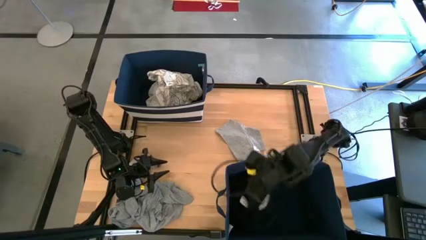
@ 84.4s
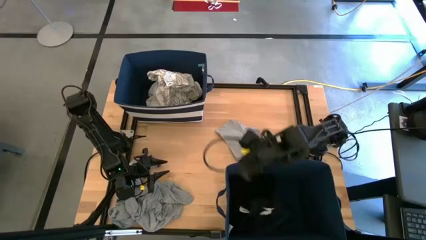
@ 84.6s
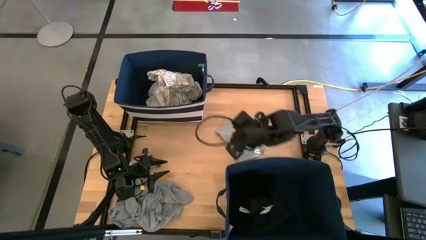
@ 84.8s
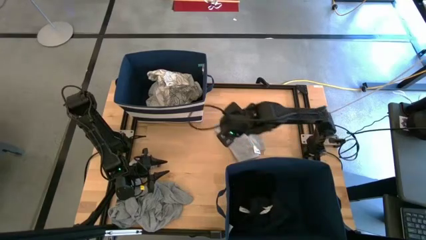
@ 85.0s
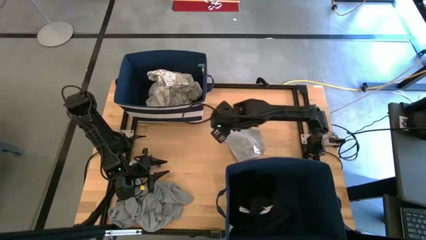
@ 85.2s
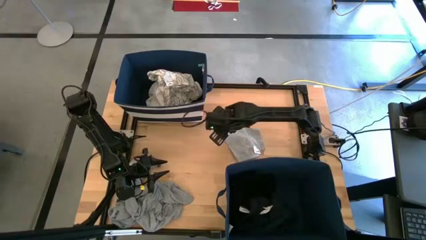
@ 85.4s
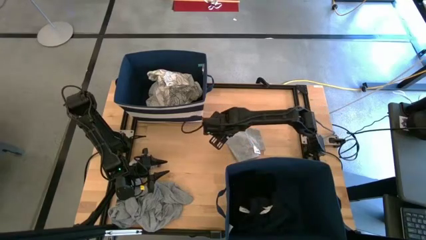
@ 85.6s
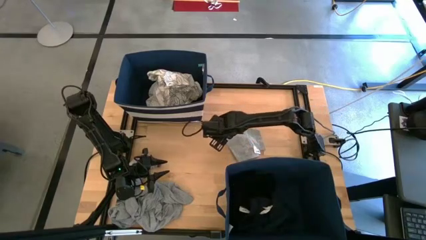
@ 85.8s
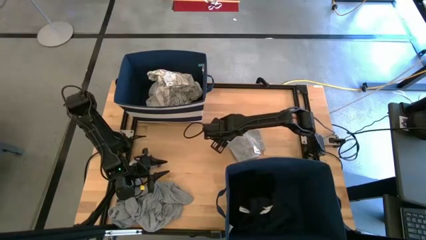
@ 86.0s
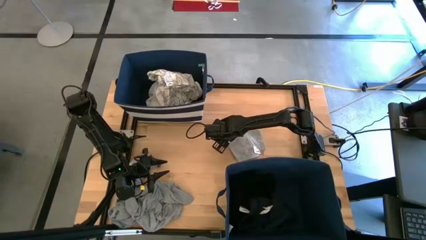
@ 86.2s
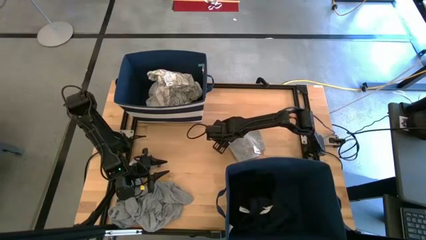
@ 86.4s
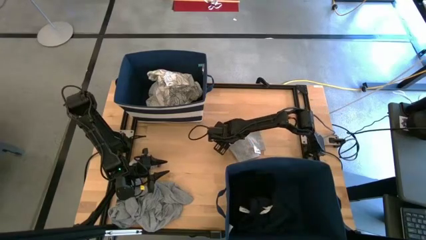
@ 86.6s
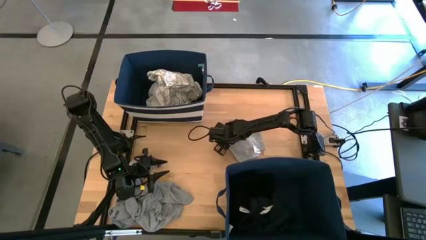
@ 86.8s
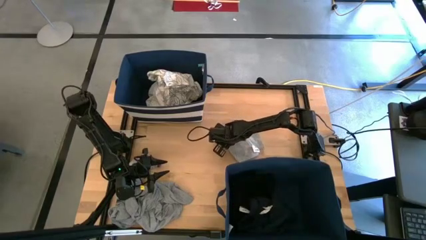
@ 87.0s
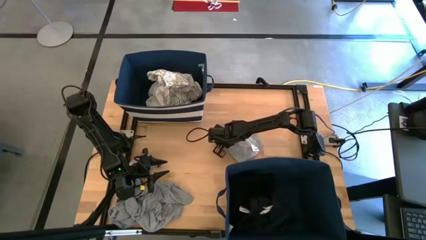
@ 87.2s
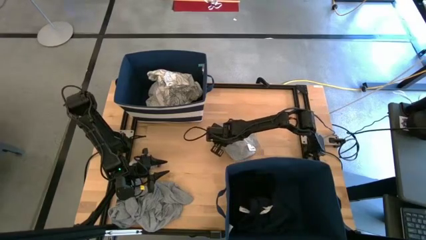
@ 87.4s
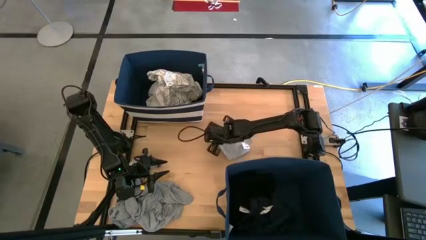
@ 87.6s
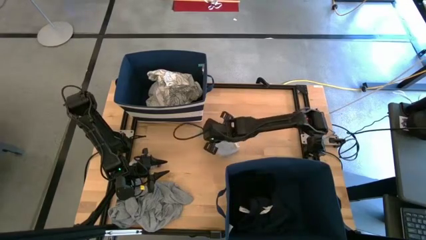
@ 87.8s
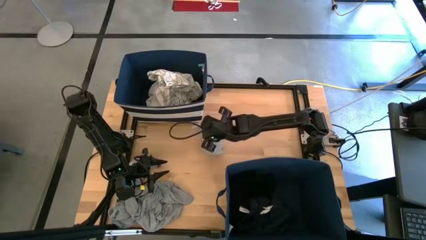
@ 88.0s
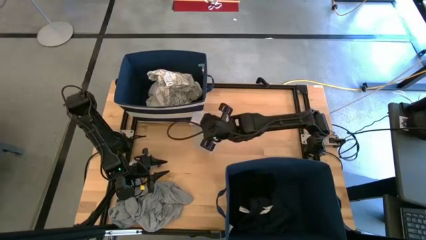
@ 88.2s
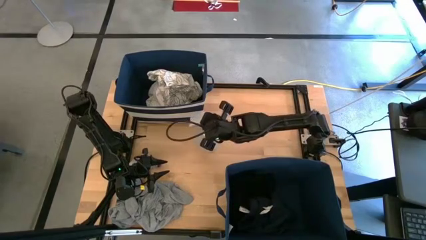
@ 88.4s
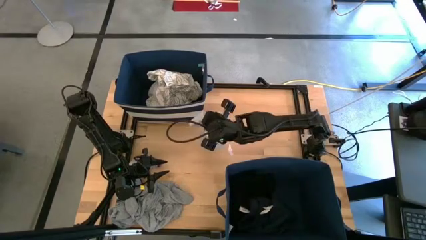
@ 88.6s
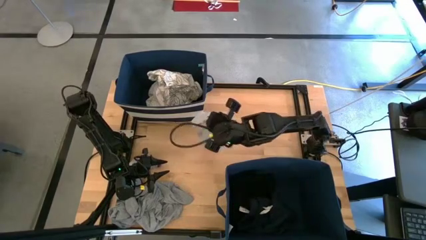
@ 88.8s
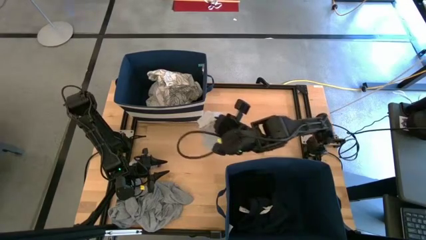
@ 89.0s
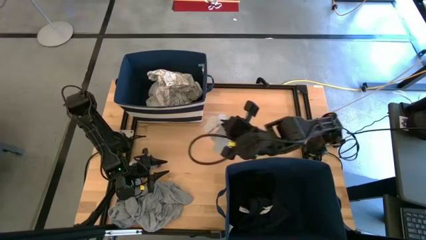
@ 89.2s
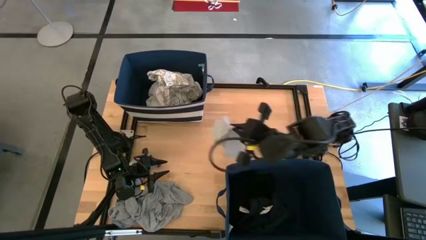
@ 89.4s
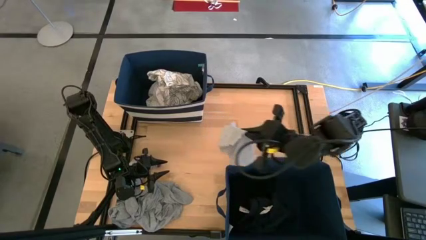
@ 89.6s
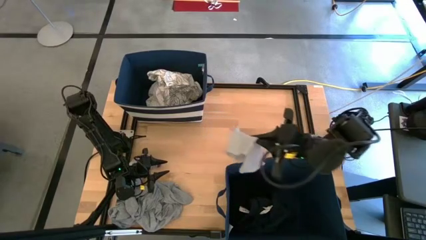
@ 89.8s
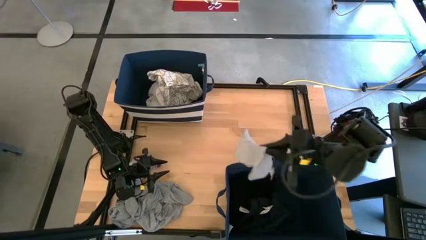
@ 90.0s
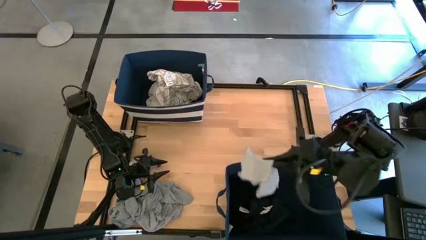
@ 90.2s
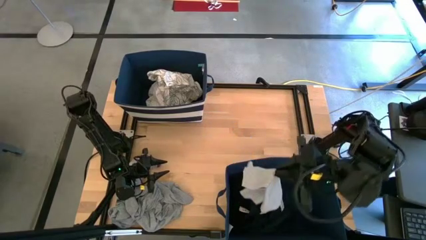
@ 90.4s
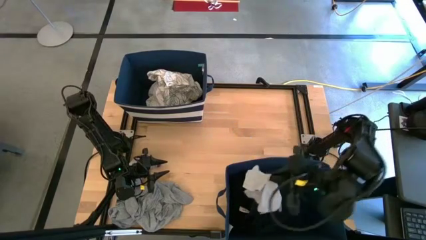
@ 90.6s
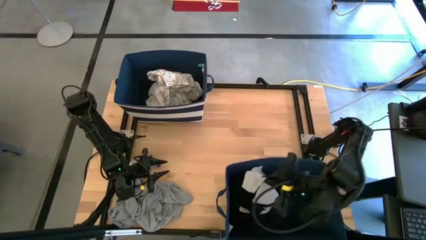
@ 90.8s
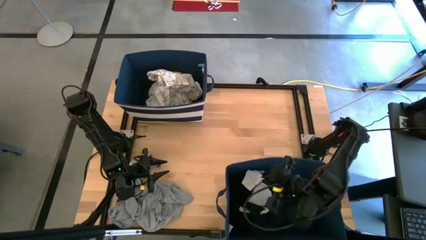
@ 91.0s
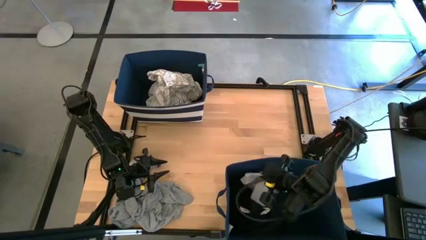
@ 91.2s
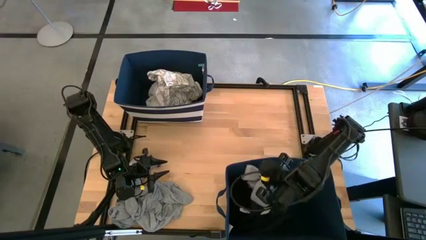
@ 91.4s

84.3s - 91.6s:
Task: Sort clothes
Put the gray boxer into the bottom blue laundry organizer

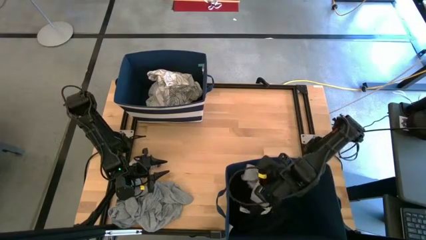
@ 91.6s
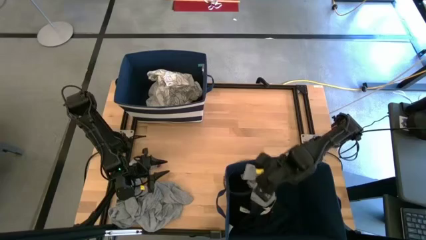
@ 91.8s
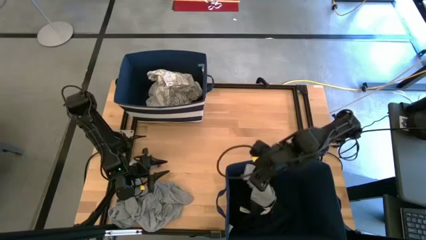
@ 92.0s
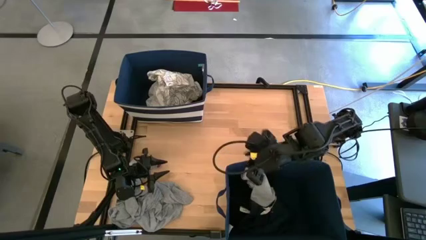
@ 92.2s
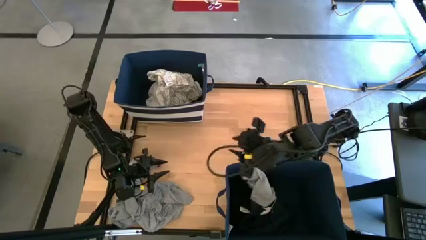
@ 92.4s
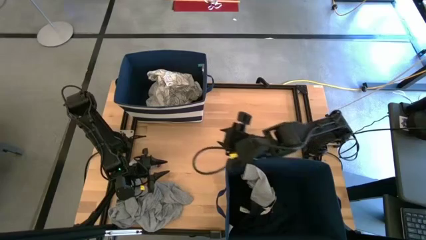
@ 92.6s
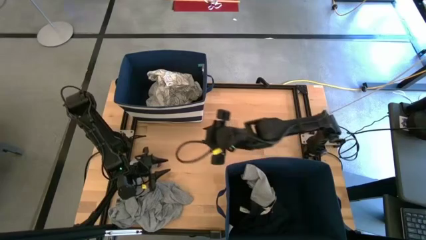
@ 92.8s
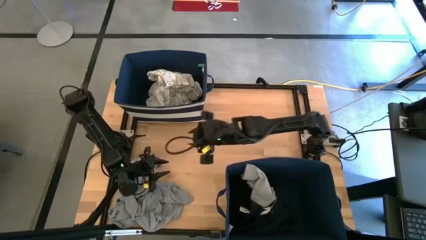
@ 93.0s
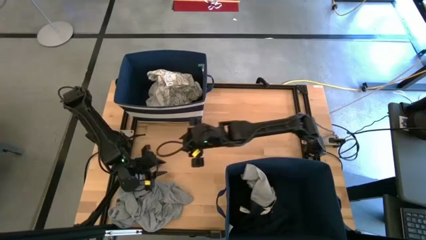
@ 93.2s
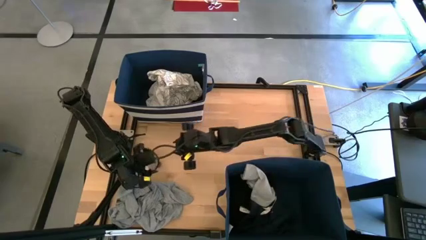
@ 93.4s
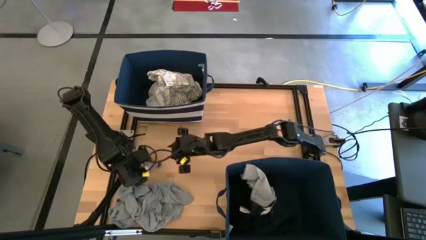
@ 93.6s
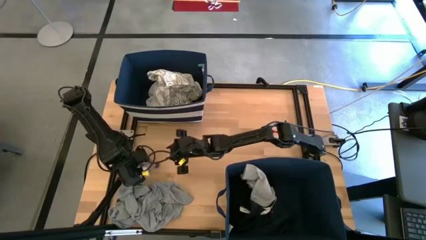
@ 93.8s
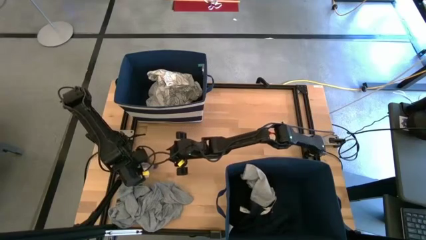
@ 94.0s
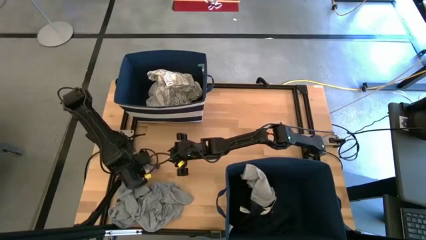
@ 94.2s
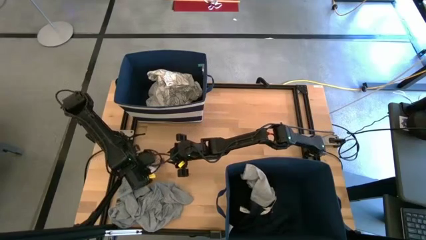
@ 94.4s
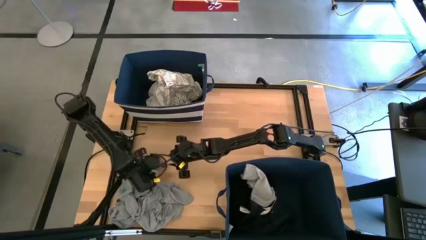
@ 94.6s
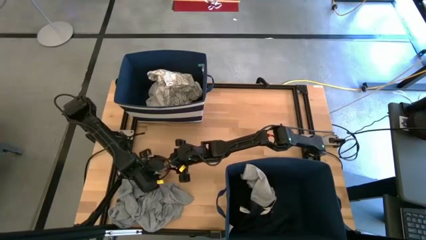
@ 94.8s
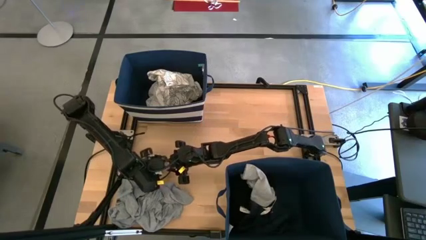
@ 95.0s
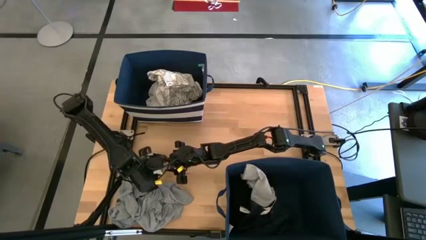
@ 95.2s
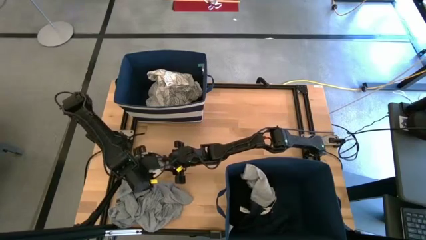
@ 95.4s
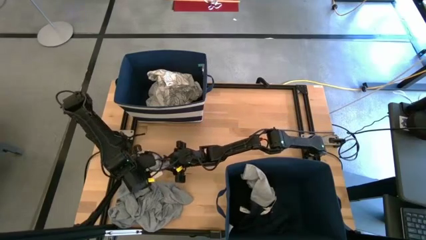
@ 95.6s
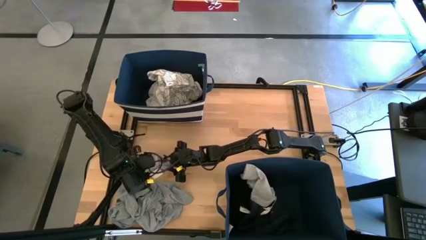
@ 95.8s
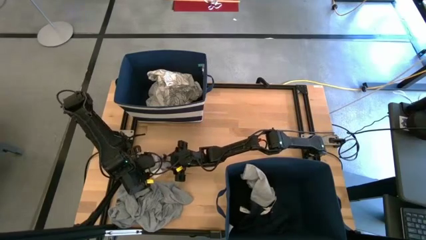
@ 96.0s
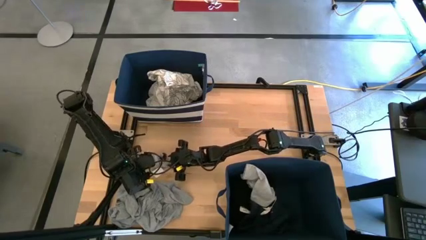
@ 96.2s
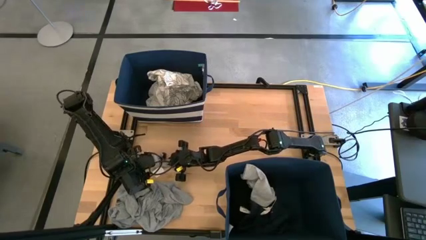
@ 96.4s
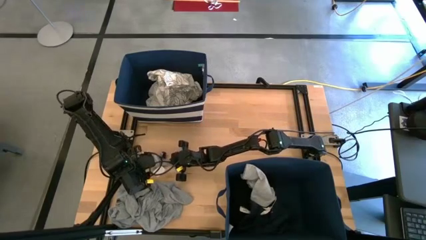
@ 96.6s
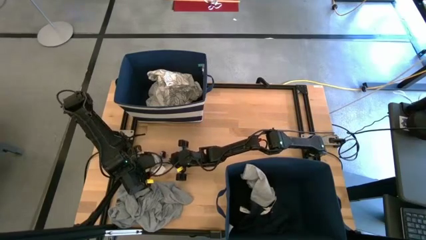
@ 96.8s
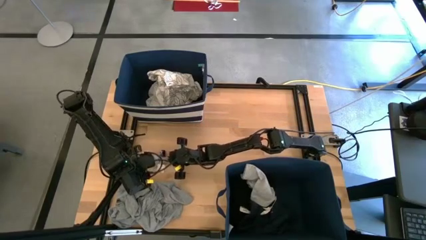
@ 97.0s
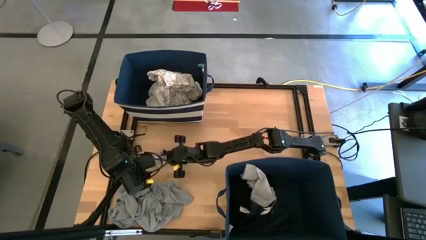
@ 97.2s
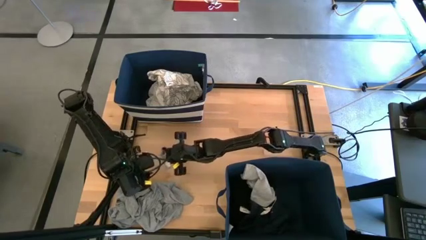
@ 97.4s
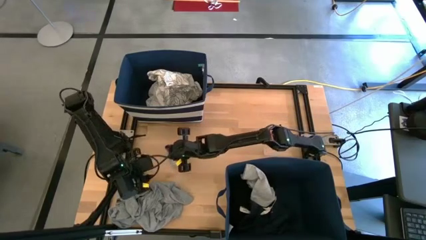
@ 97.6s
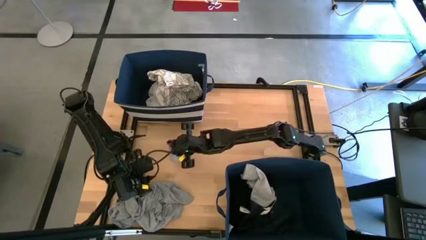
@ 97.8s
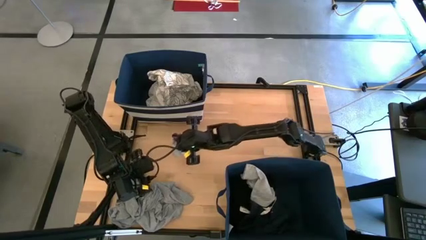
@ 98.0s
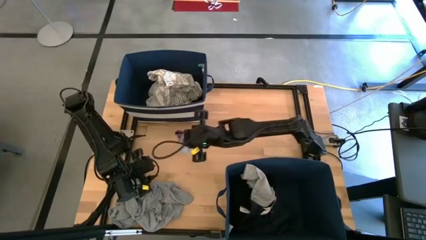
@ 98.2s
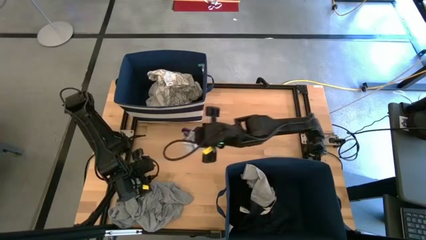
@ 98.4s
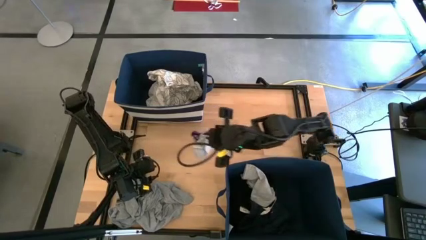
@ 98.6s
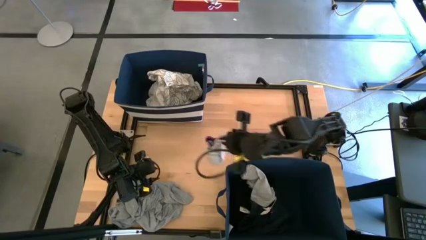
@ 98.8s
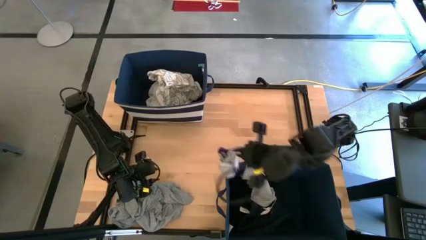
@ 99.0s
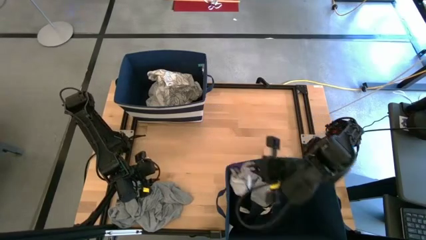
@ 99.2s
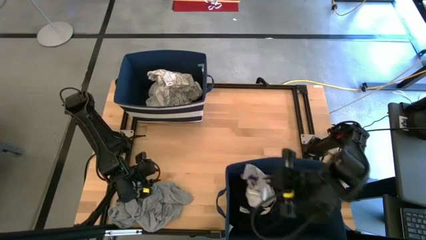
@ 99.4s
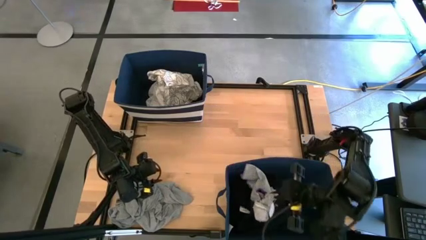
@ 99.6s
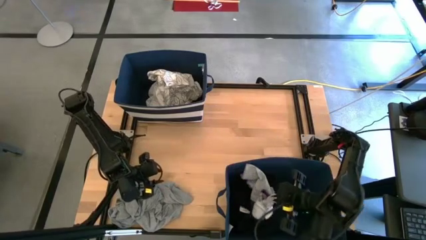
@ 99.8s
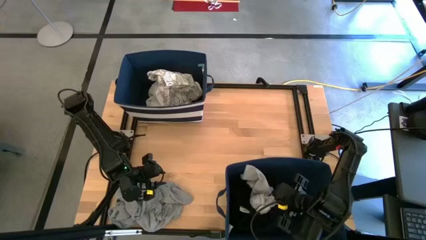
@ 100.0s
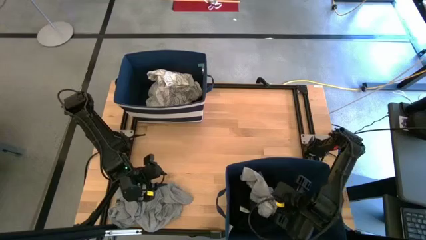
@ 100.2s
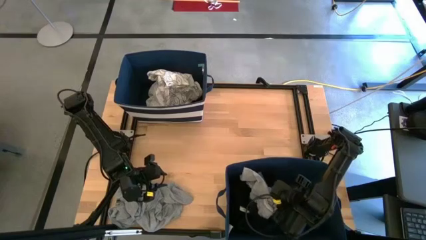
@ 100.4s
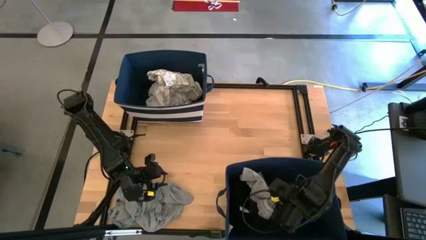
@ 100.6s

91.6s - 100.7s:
Put the gray striped socks into the bottom blue laundry organizer
